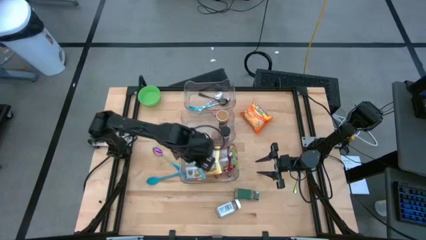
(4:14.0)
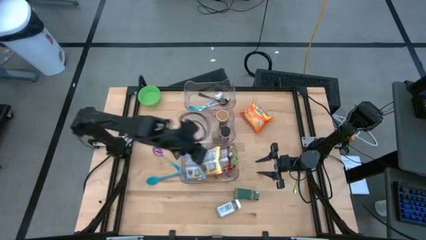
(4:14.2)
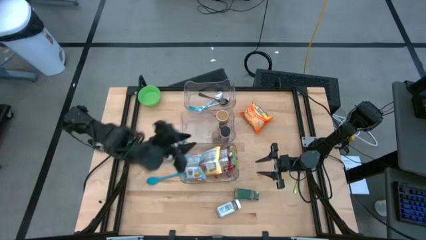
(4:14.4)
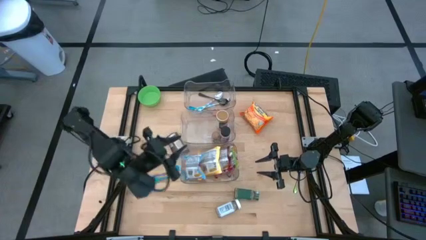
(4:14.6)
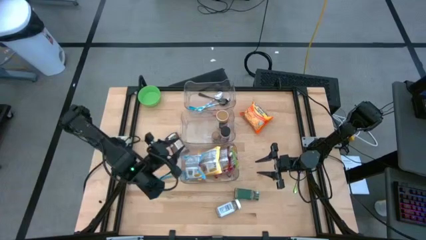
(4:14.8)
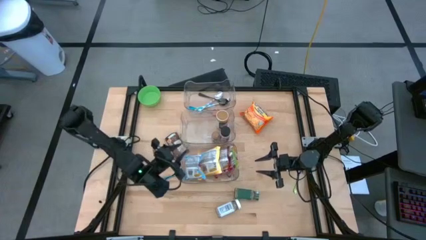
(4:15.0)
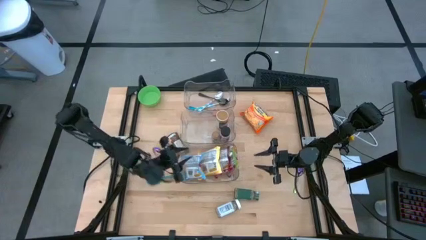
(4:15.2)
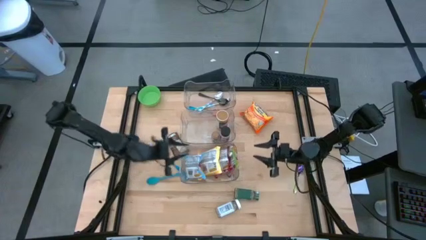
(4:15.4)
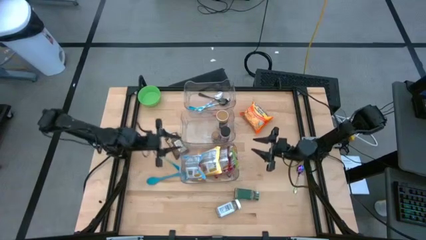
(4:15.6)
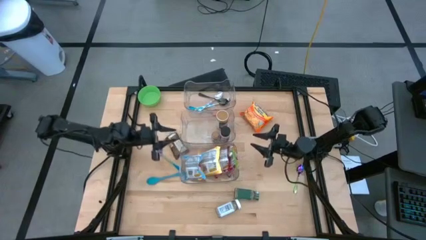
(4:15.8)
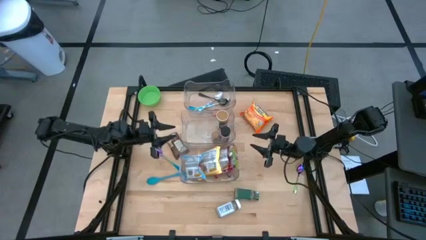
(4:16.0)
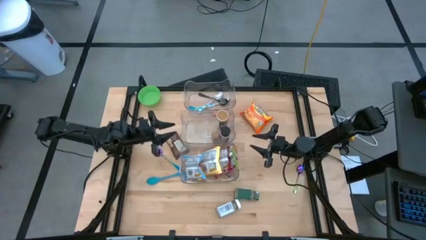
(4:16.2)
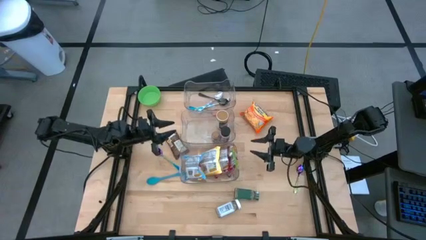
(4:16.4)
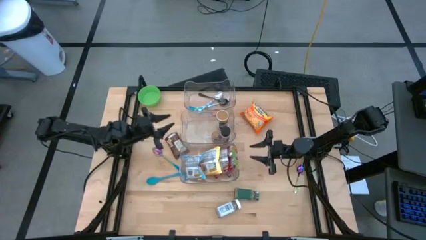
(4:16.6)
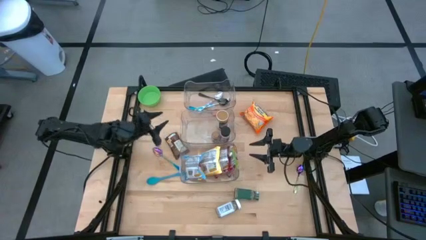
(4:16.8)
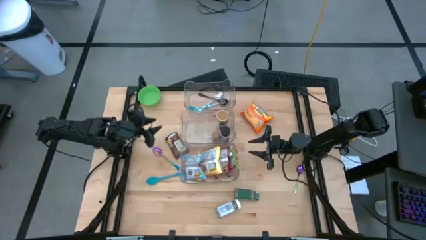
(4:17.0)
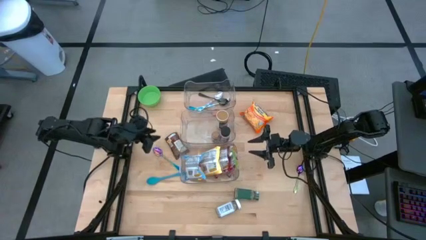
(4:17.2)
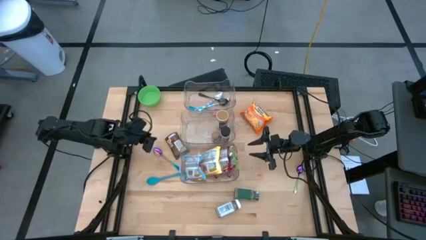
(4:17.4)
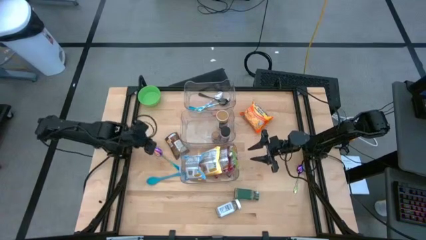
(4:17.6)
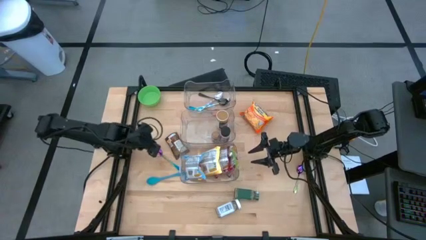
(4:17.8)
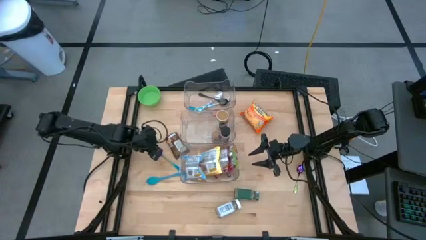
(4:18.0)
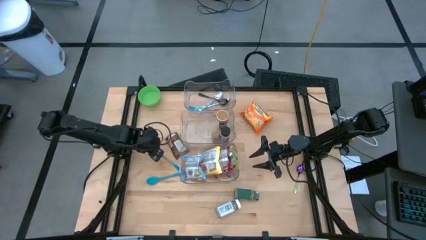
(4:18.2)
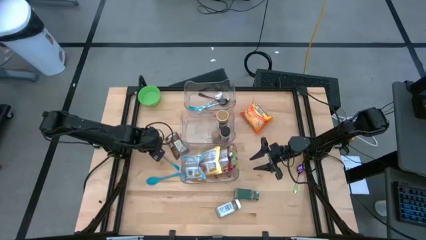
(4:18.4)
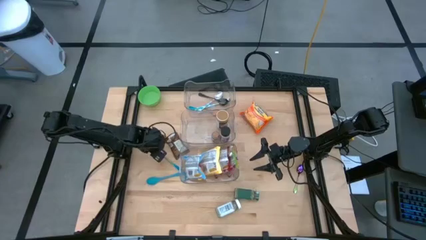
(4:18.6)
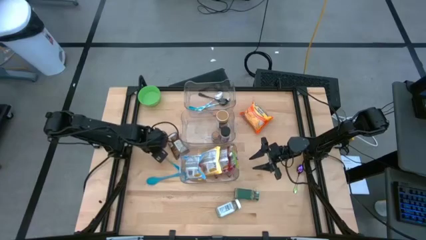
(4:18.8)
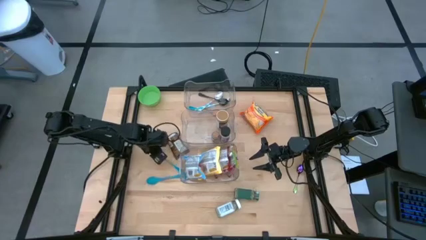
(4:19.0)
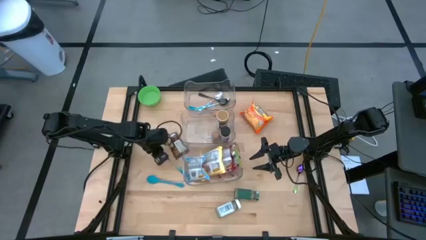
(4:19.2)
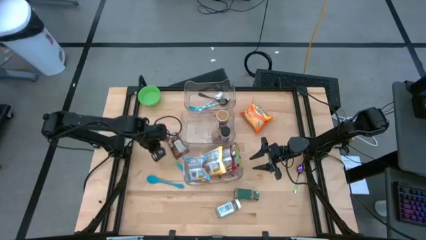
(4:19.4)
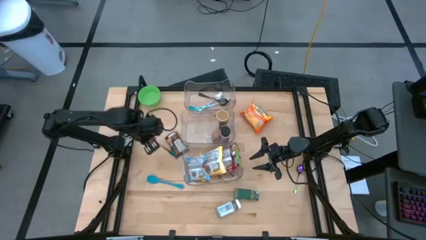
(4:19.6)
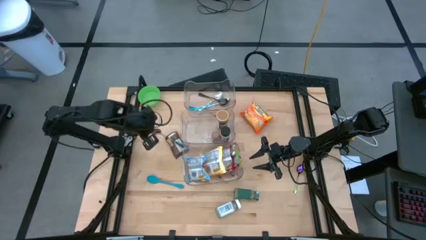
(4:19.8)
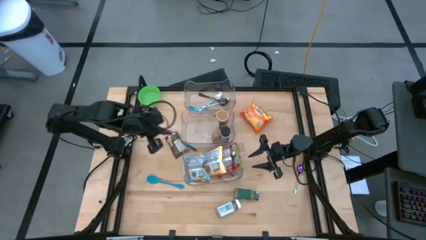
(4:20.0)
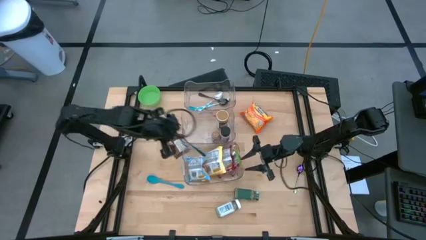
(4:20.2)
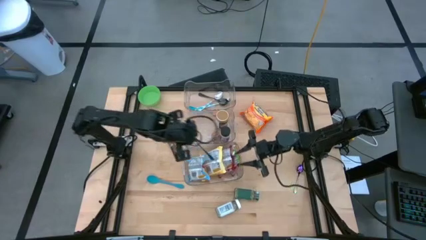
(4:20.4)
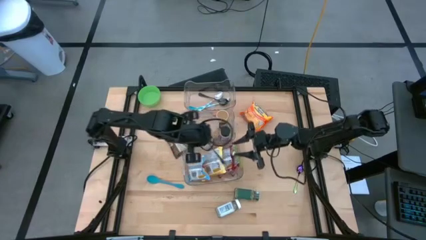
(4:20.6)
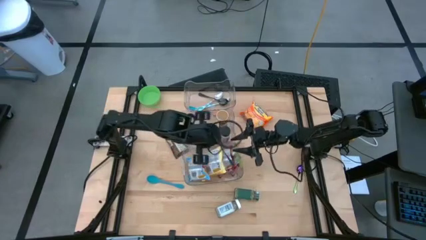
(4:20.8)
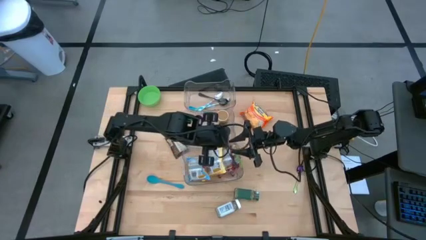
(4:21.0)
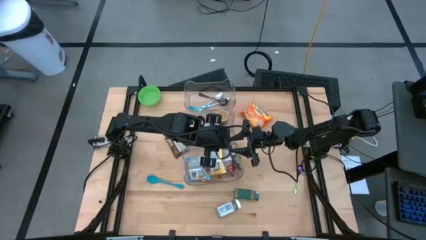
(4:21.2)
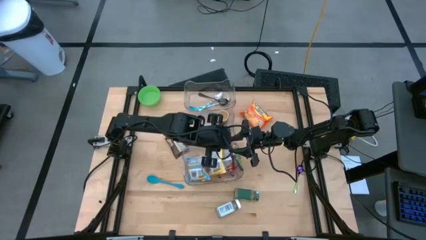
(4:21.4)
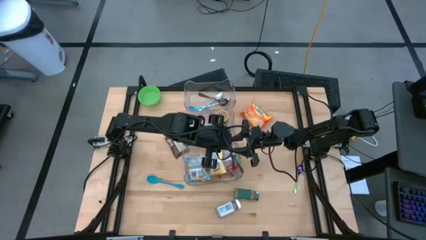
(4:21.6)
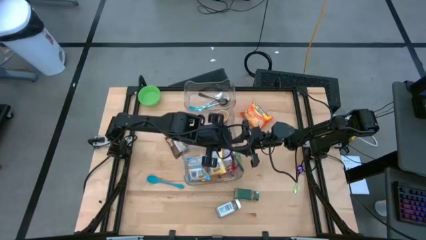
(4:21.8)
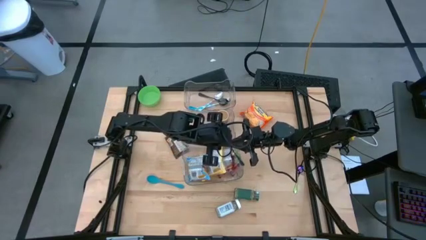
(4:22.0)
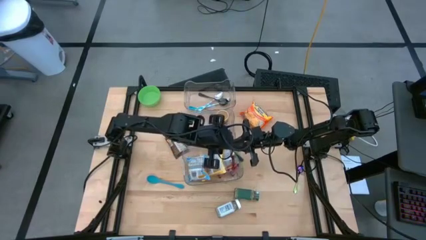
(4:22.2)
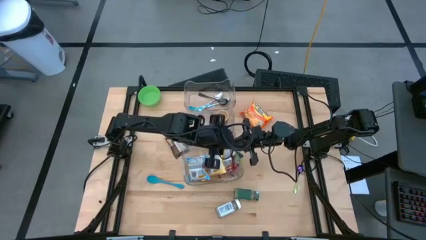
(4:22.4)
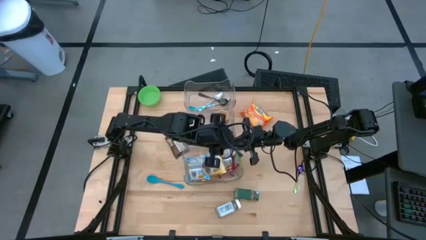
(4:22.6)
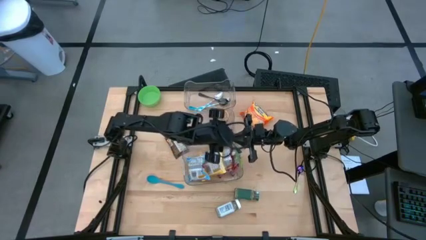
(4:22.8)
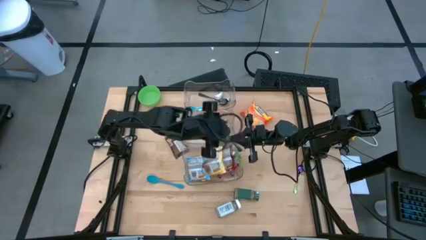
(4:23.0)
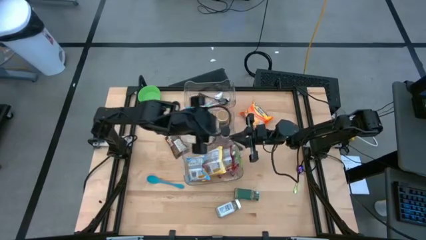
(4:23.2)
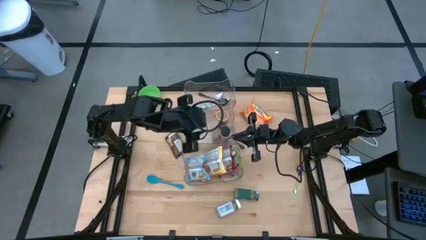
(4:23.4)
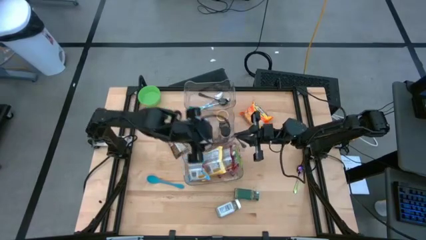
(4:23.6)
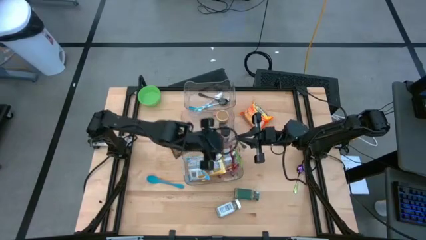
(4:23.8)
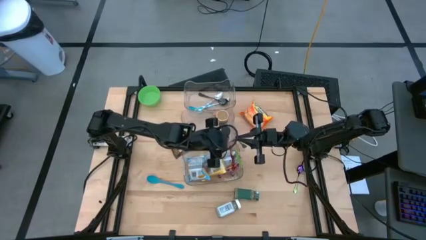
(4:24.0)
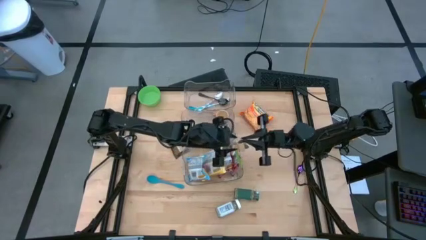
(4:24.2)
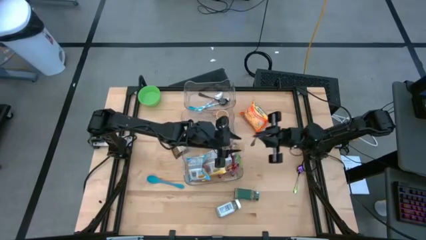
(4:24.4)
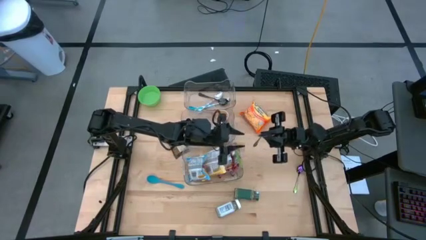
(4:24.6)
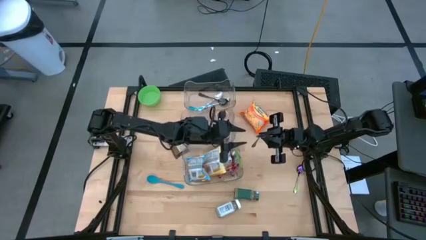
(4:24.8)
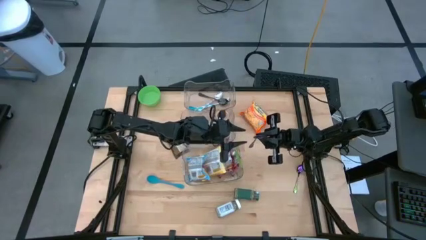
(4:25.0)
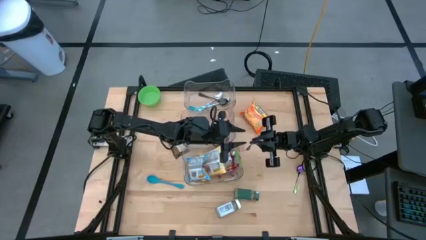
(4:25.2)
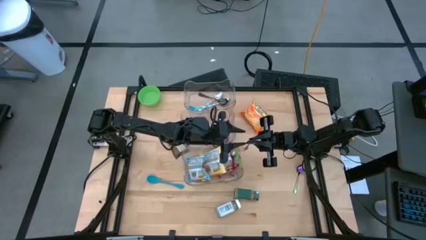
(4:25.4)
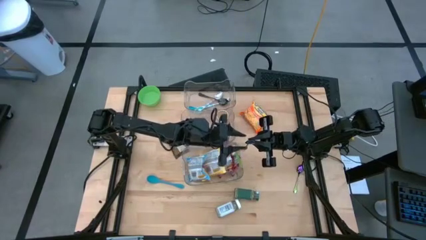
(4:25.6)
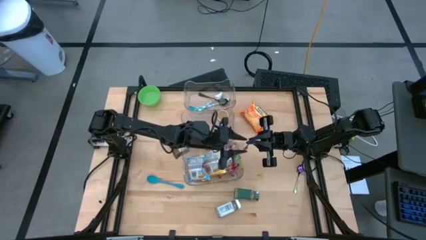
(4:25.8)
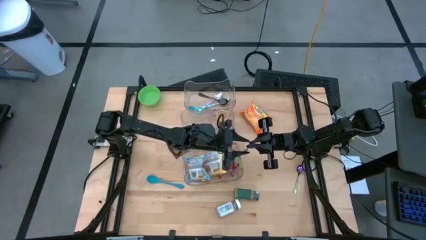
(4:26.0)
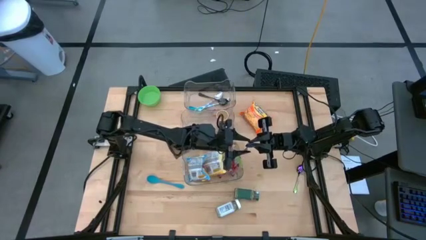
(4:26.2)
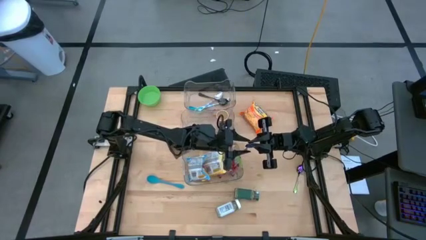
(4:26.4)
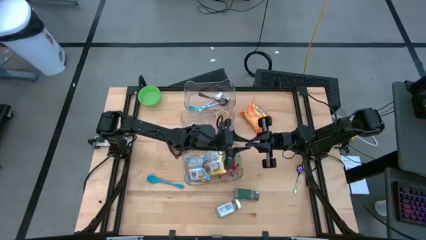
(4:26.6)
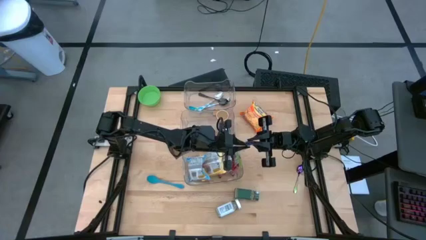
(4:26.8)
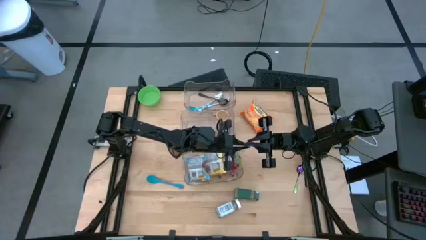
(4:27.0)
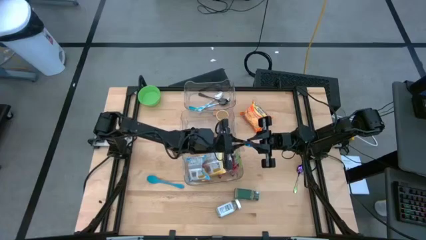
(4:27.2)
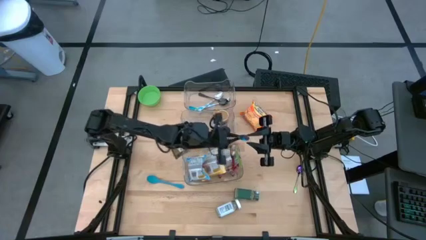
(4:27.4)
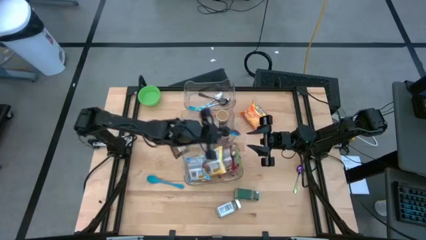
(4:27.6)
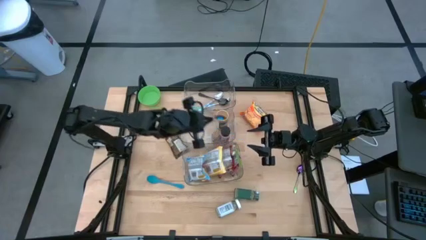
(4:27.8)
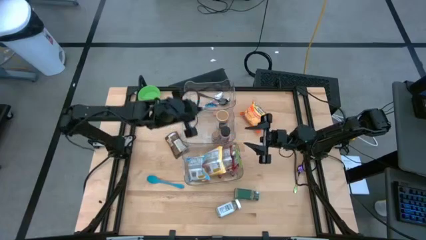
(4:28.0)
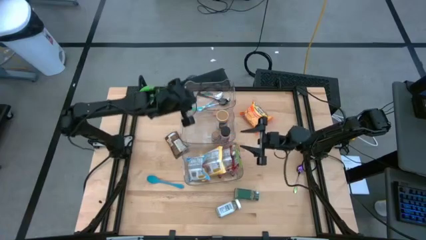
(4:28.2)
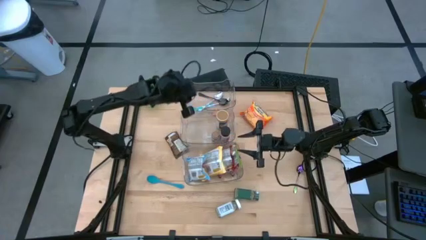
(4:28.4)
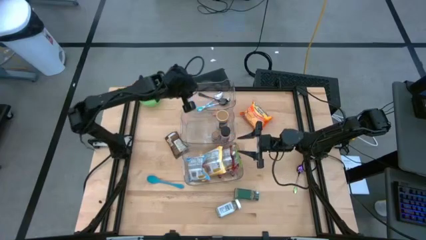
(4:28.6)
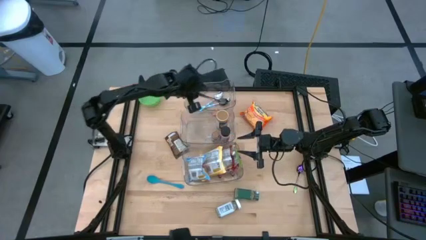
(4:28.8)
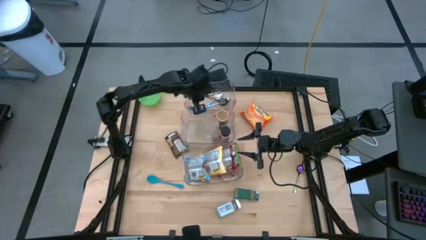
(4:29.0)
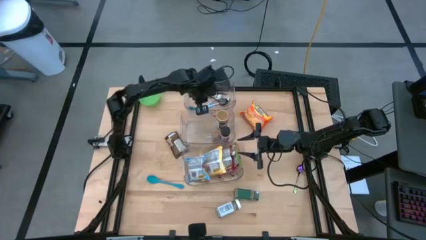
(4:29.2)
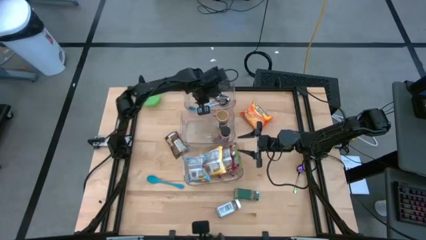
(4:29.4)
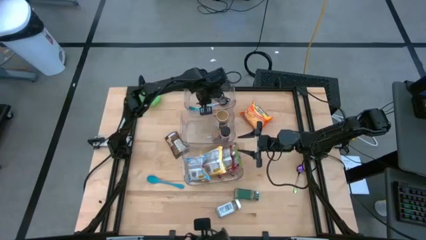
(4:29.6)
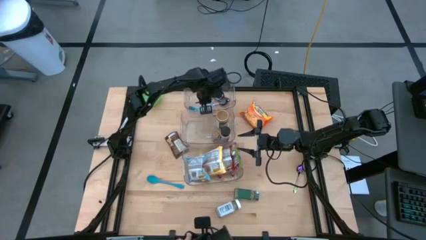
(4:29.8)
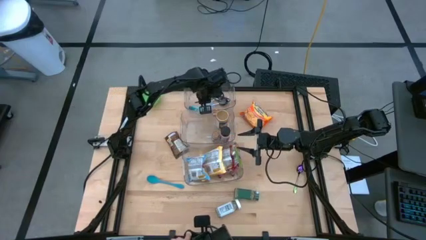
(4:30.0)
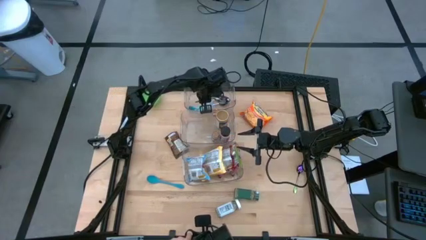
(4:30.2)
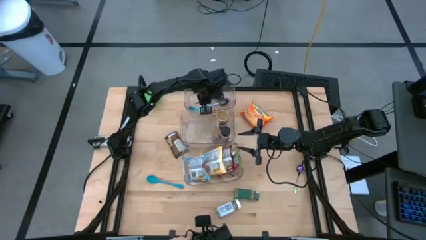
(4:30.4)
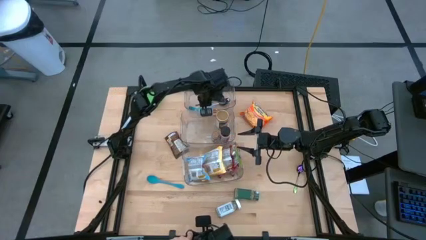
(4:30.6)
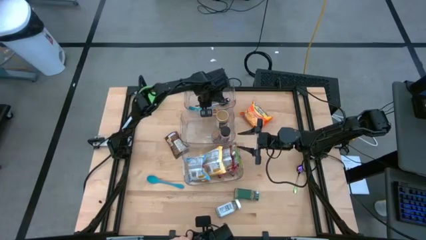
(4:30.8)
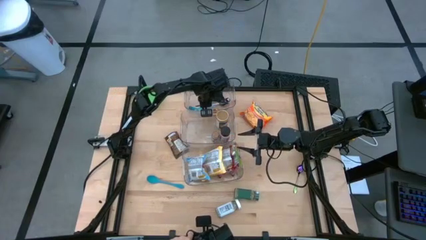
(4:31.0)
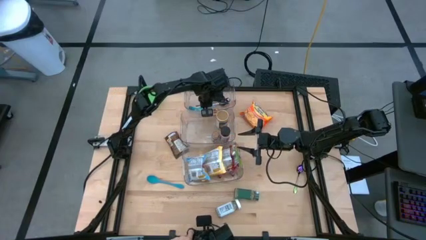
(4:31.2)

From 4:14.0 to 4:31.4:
Task: Pick & Place Food Item
Put the left blue spoon into the top transparent bin
